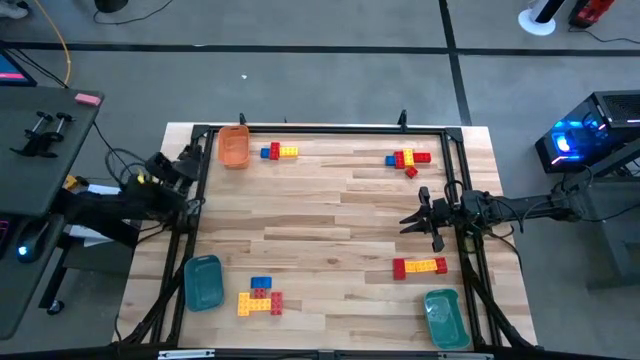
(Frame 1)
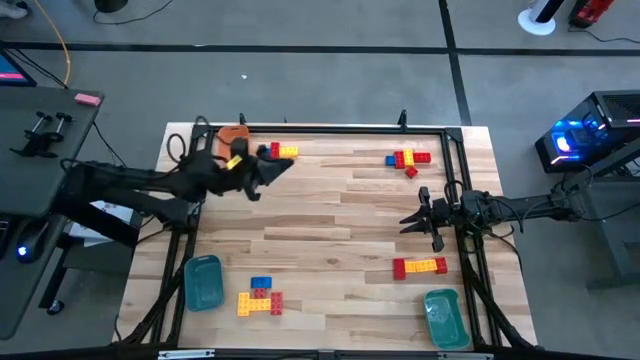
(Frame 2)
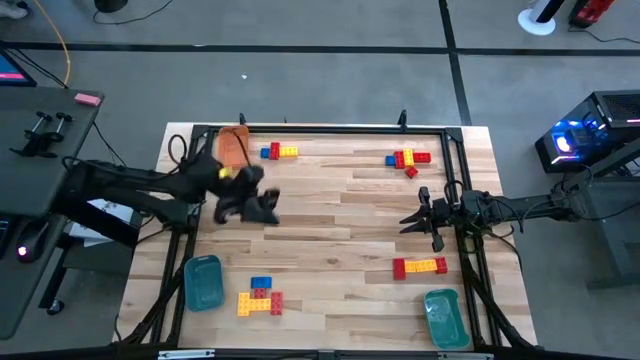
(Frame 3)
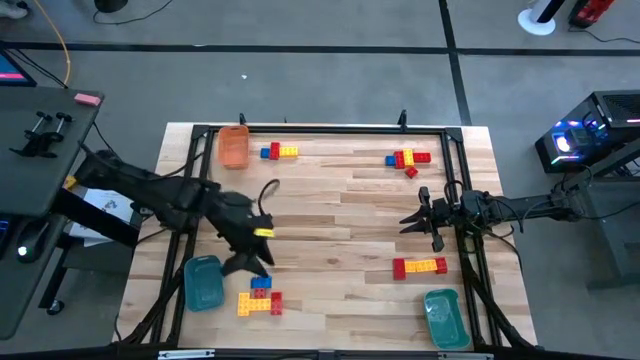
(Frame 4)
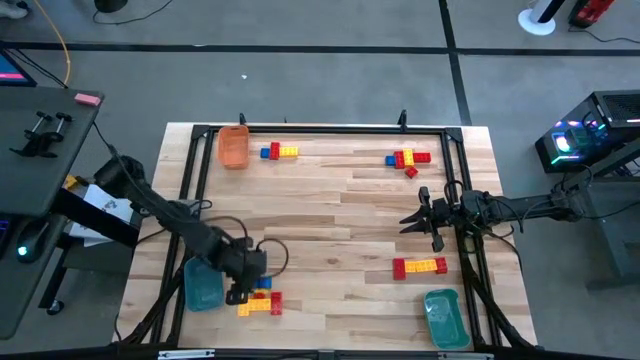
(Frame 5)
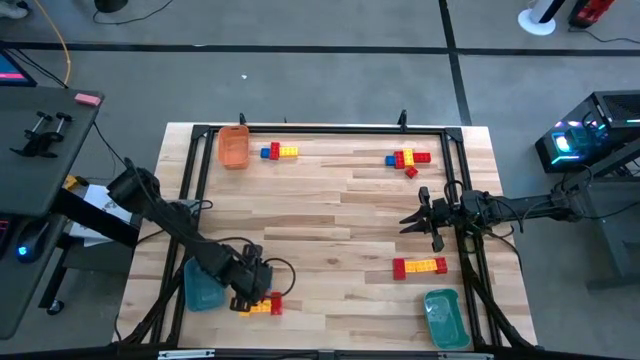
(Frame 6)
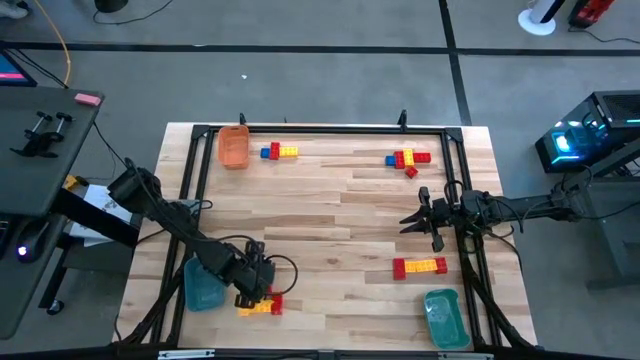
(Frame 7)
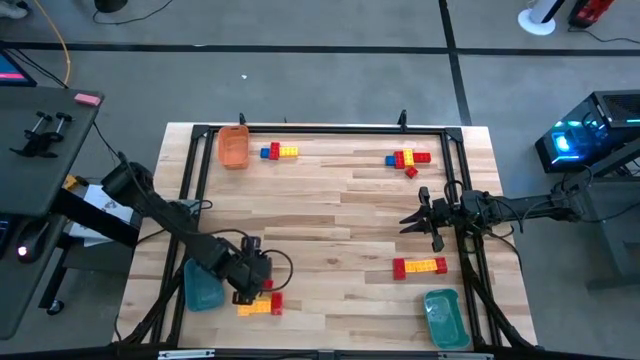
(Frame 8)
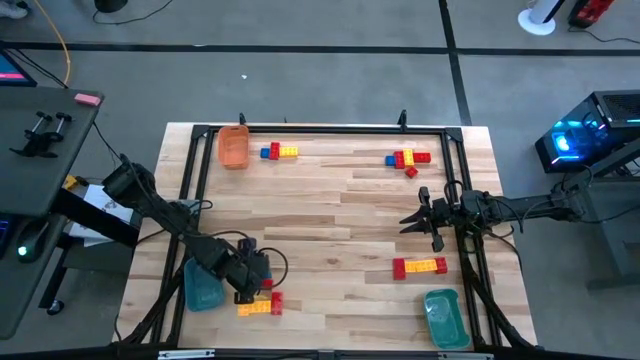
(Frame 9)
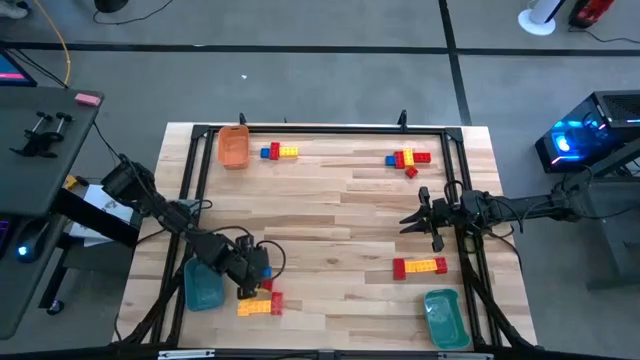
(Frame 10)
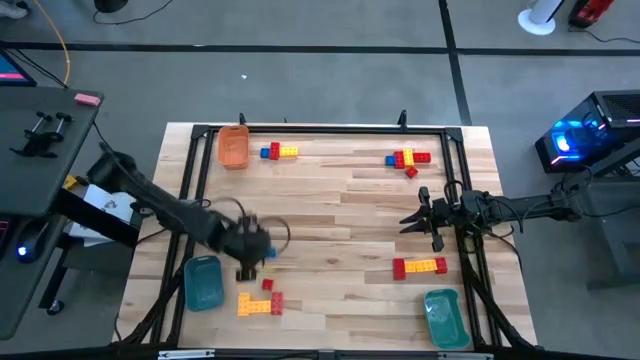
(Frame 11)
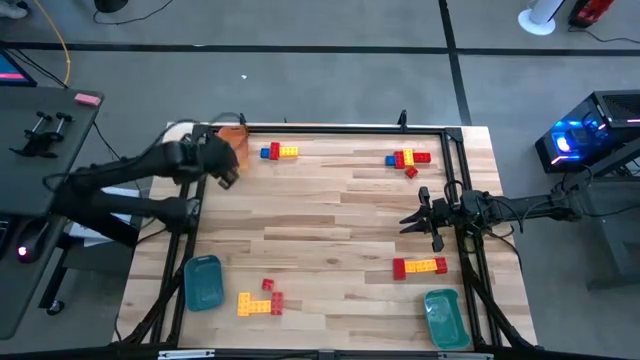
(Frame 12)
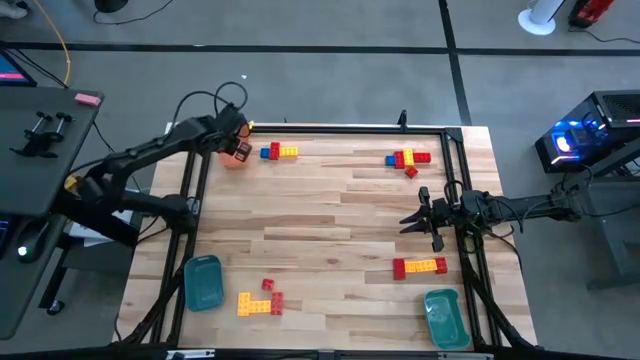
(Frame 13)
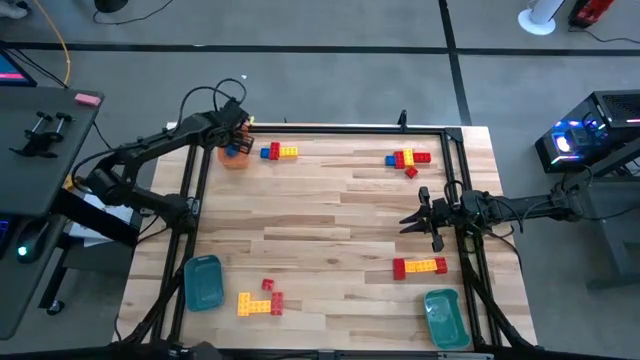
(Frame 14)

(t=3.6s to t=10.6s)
Task: Sort blocks
Put the blue game piece into the orange bin

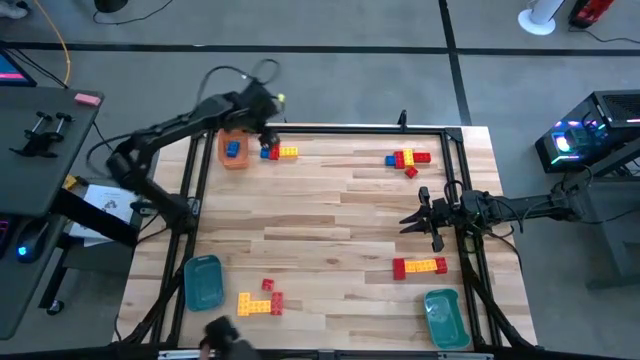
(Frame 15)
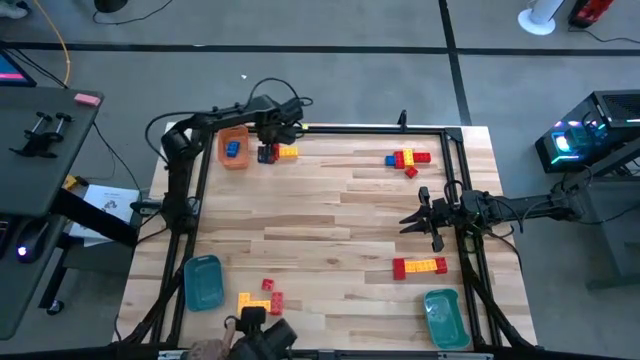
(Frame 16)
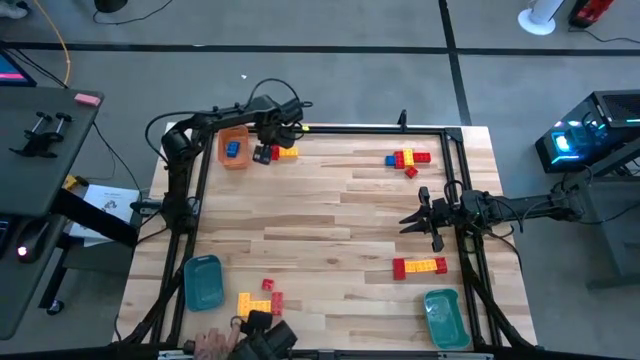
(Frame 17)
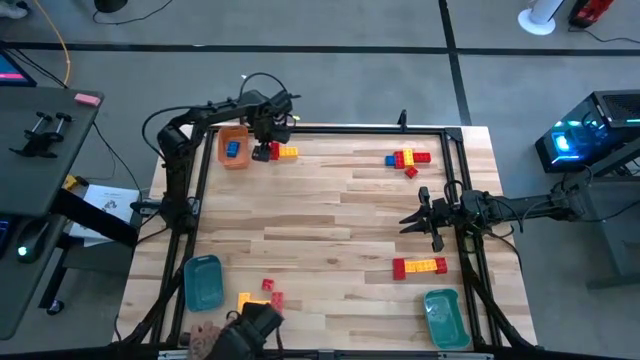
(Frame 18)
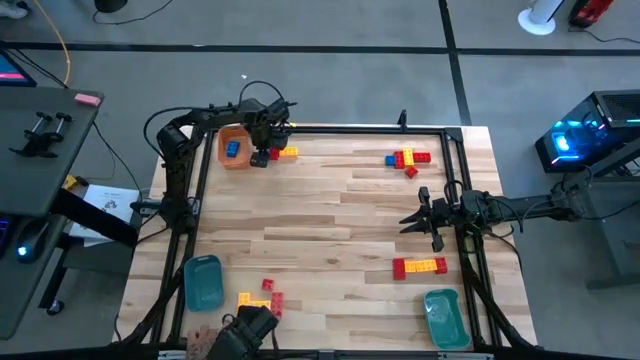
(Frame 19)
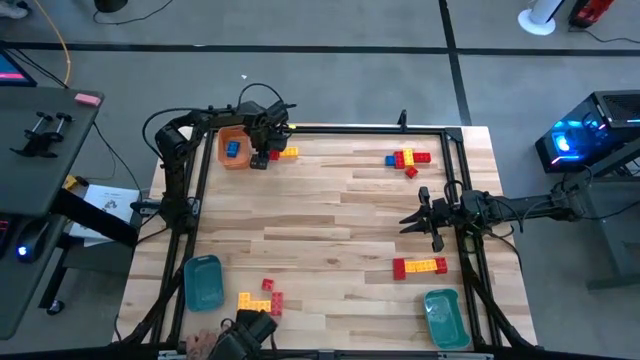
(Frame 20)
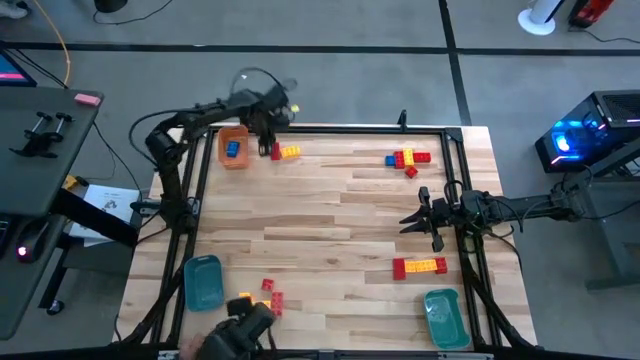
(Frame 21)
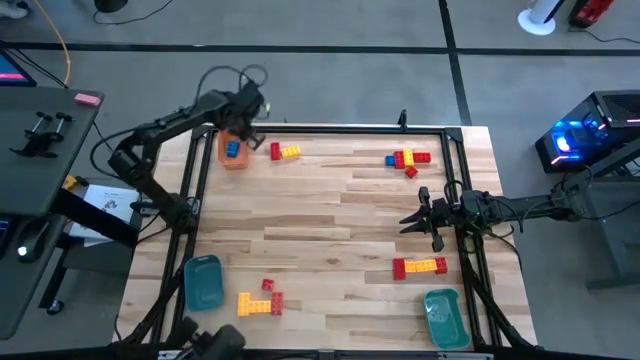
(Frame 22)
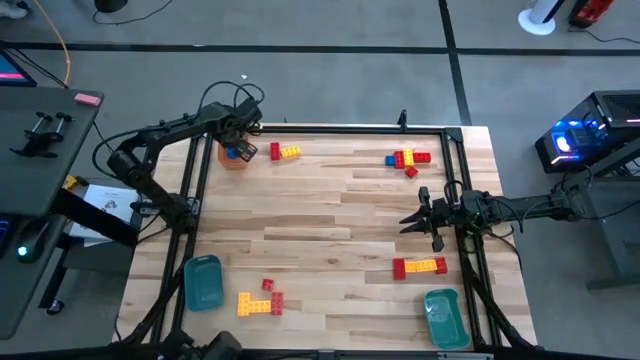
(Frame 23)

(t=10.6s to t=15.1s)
Put the blue game piece into the orange bin

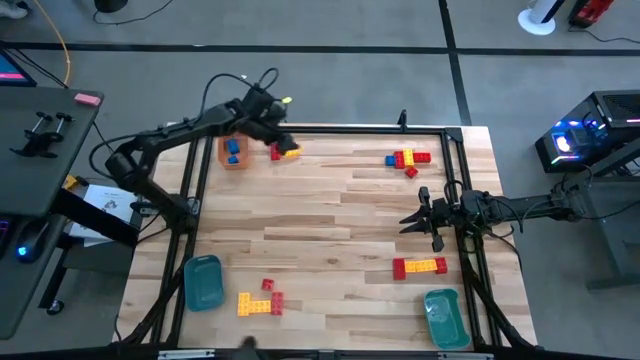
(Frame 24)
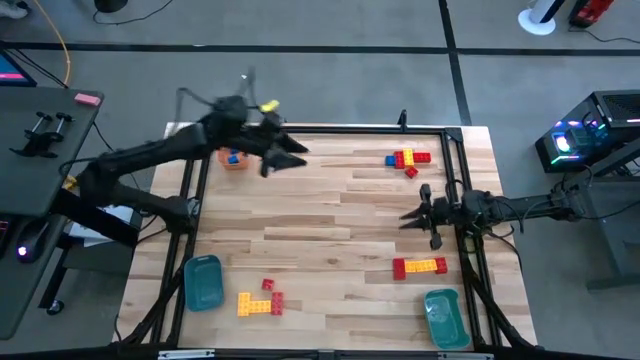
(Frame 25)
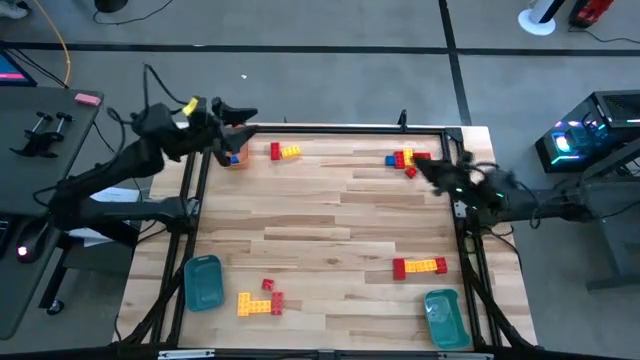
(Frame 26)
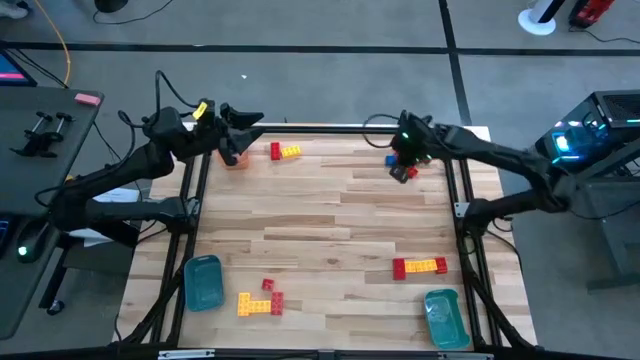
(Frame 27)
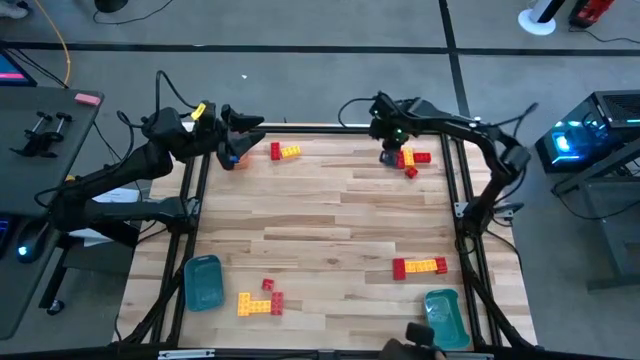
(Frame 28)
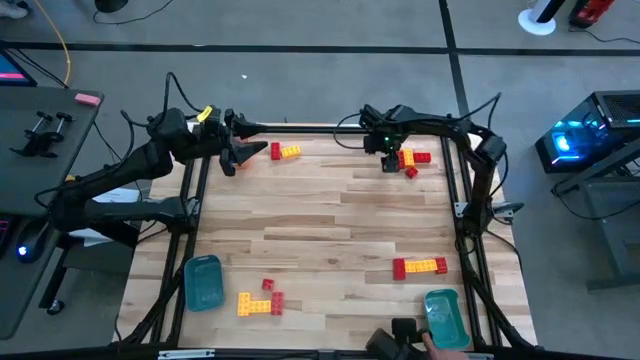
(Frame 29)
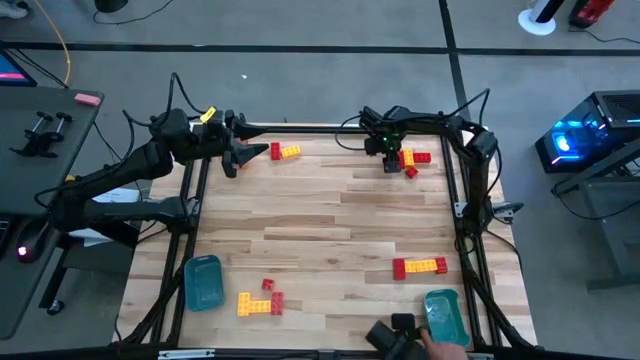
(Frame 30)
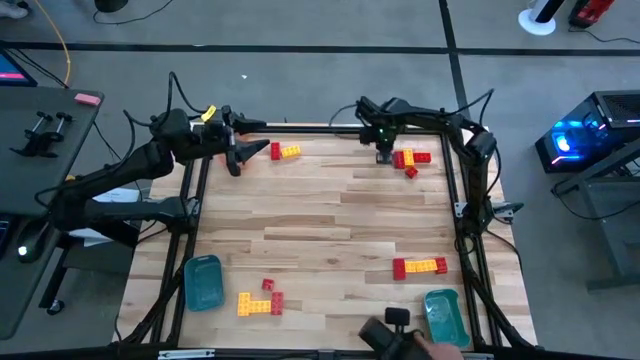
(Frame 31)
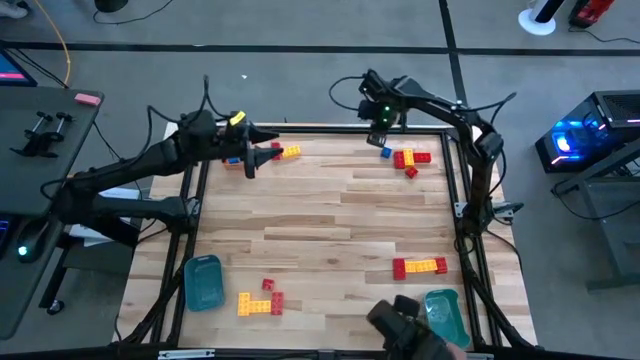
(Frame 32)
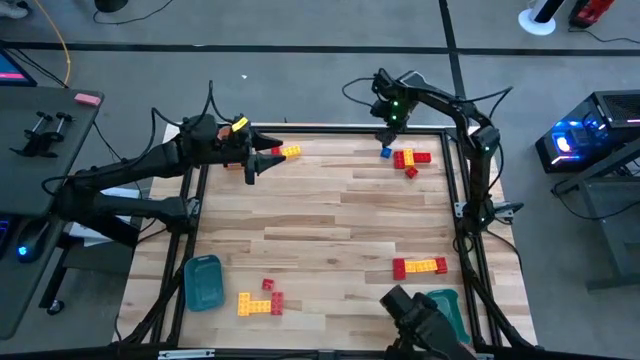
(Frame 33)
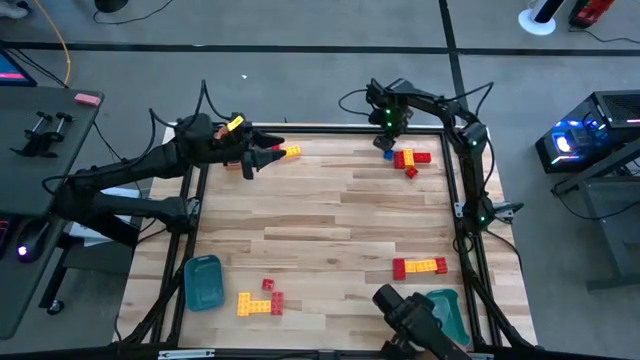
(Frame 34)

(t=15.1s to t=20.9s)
Put the blue game piece into the orange bin

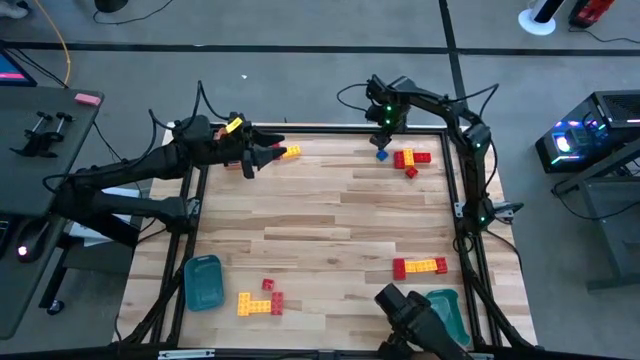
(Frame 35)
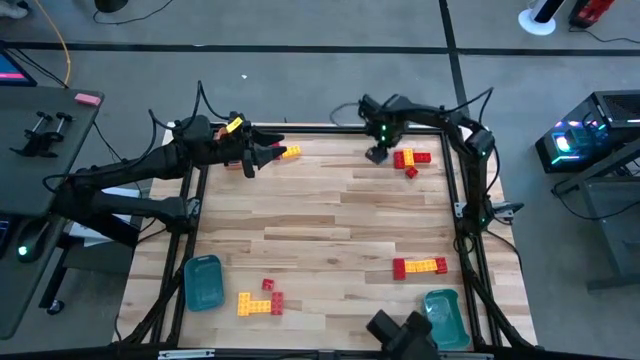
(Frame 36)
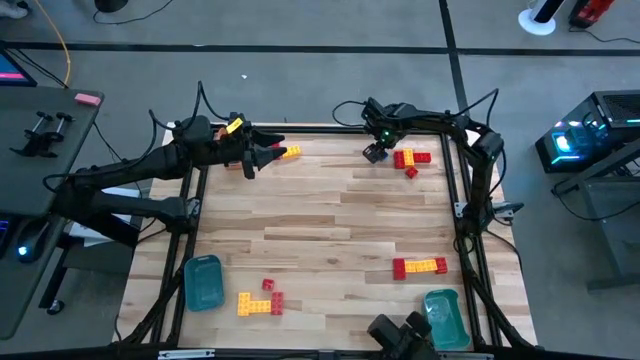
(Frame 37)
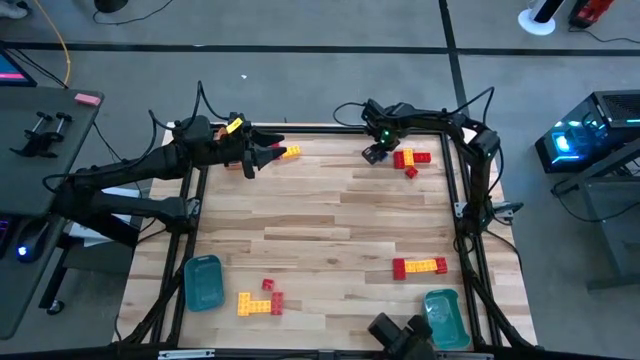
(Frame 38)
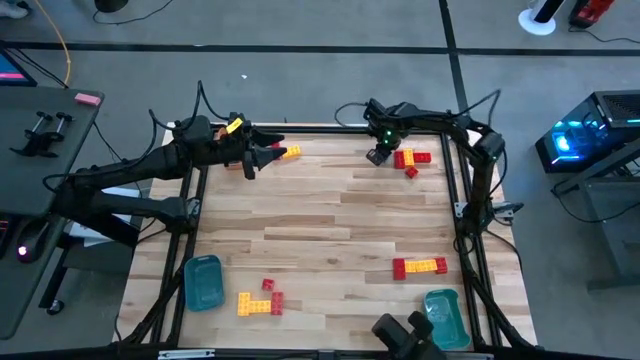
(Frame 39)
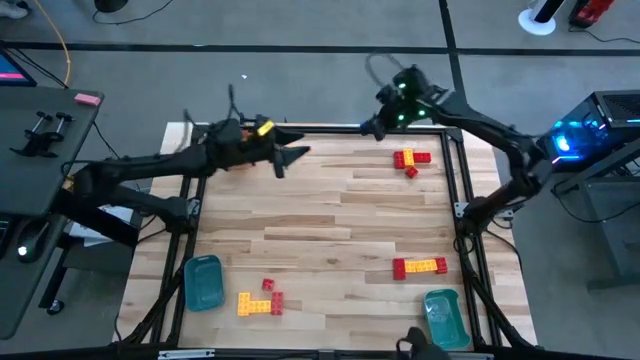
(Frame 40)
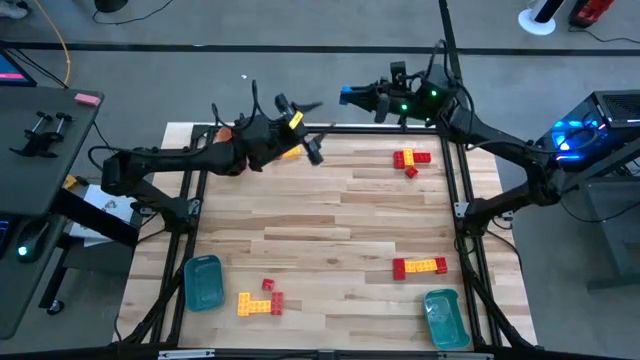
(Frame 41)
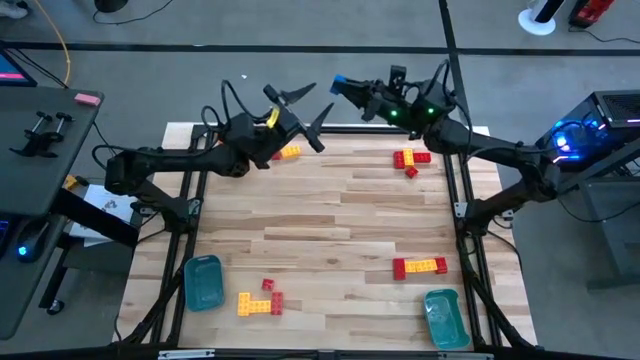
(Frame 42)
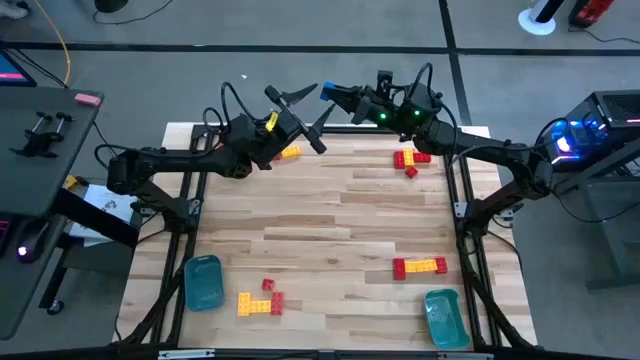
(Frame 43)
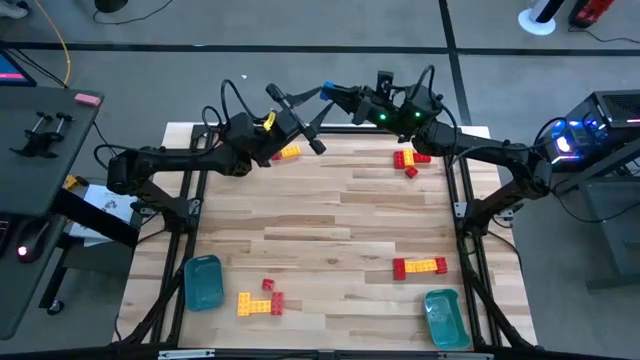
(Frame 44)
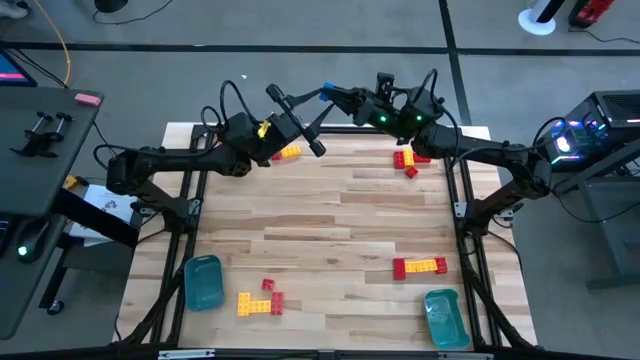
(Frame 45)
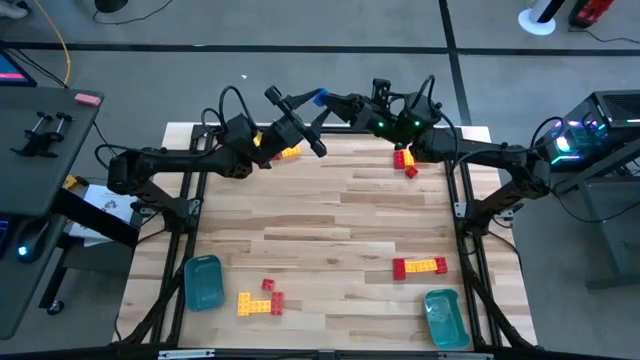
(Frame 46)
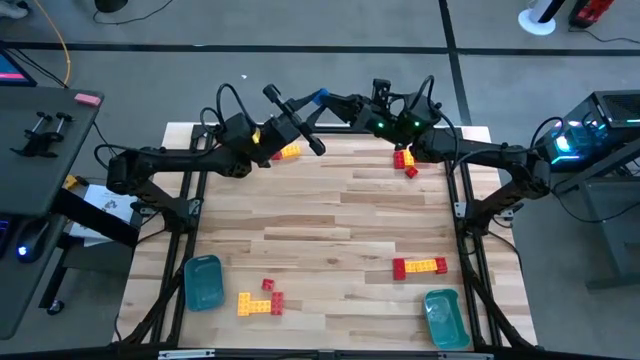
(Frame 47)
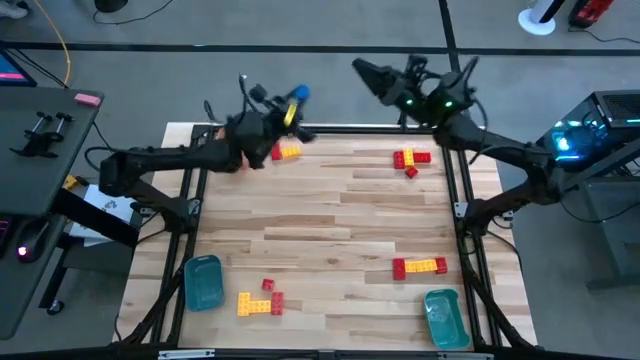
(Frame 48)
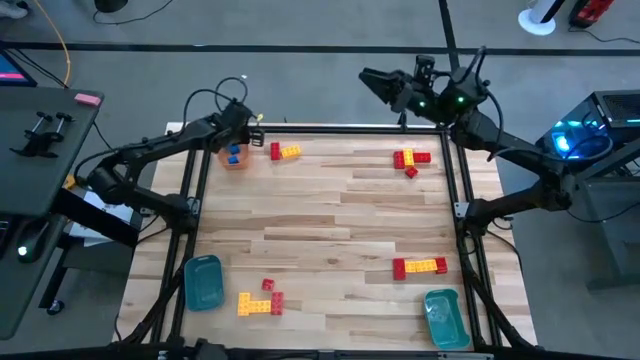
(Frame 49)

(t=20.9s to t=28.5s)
Put the blue game piece into the orange bin
